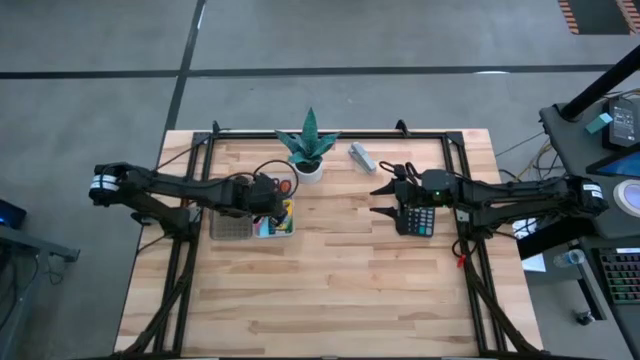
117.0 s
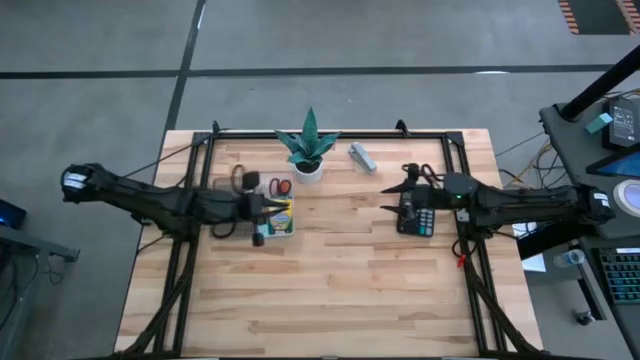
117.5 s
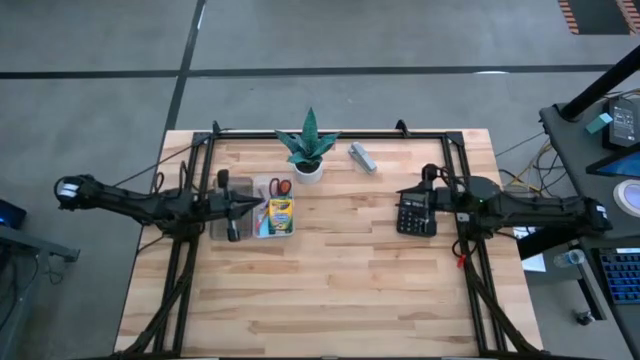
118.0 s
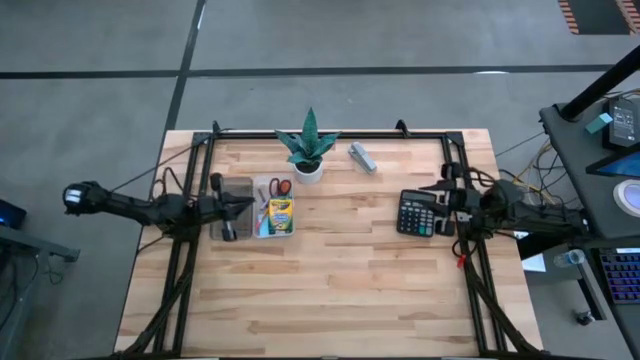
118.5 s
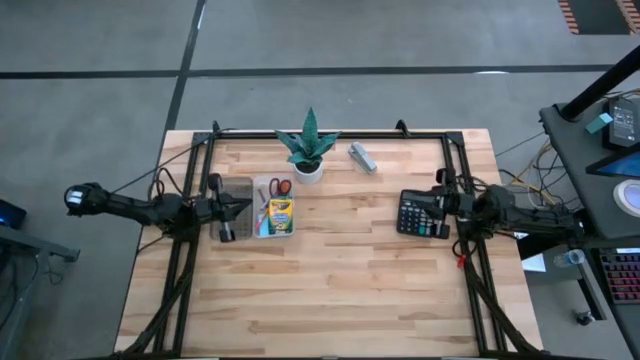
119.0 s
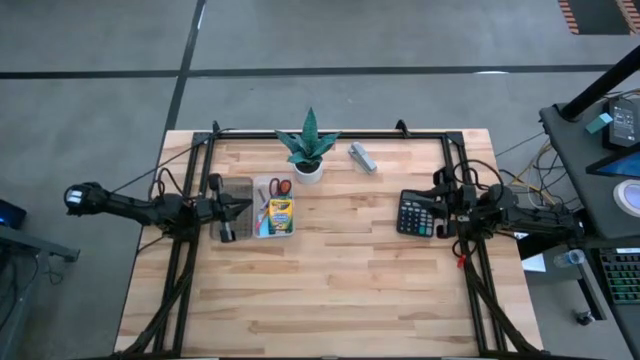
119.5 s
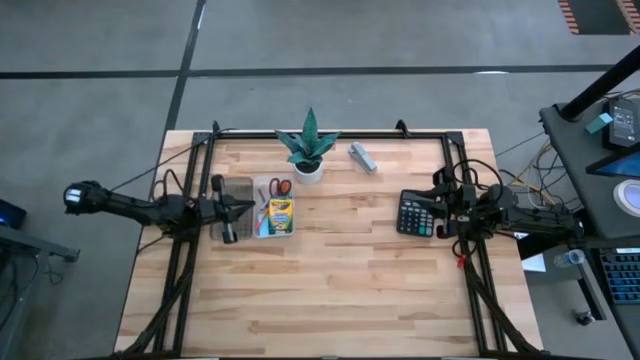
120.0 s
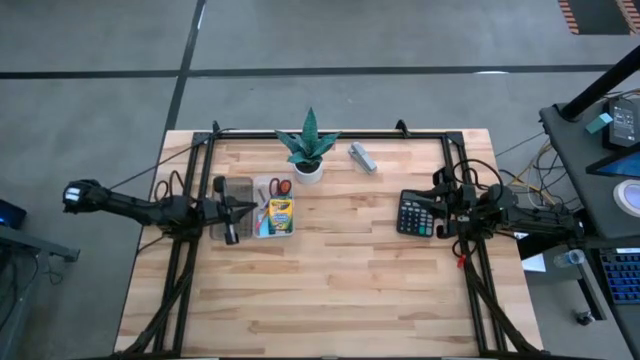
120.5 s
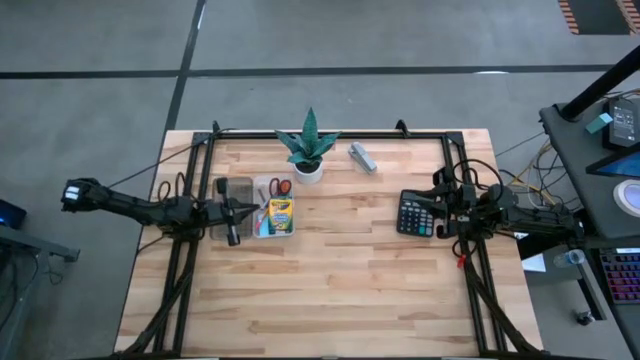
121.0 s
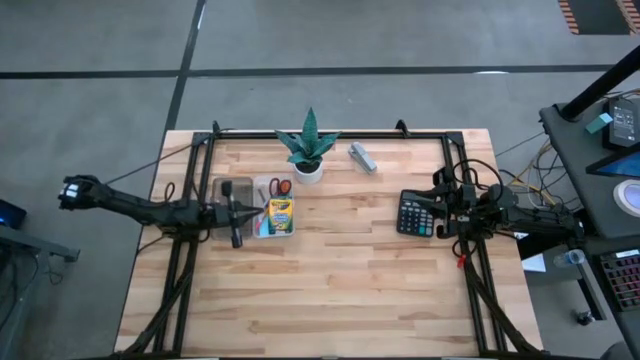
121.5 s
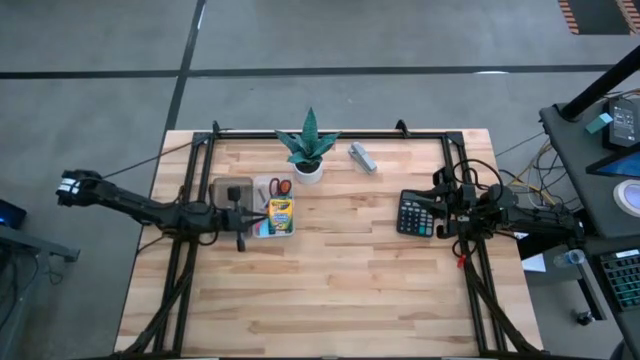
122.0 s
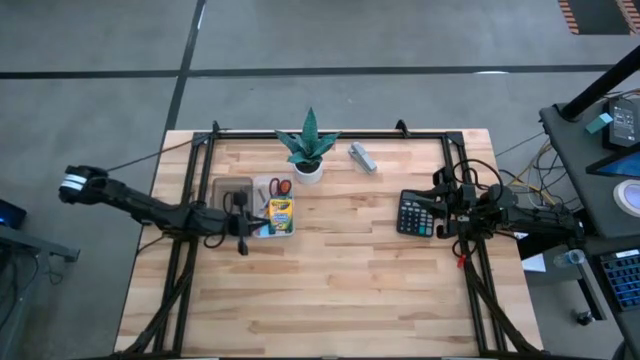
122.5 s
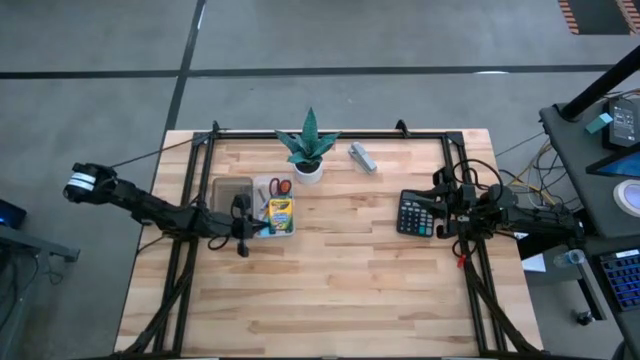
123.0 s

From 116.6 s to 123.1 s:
Task: Pack school essentials
Return to Home Position

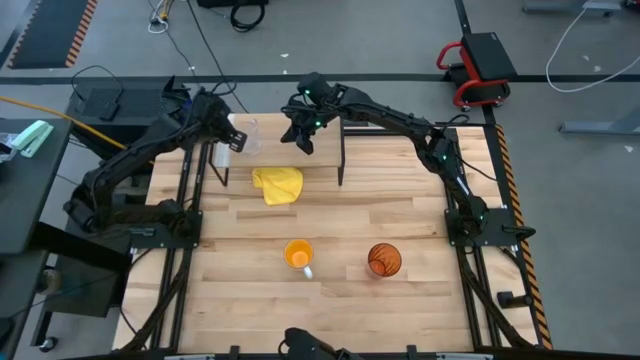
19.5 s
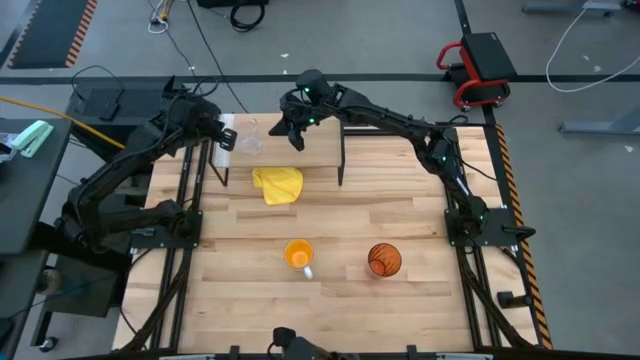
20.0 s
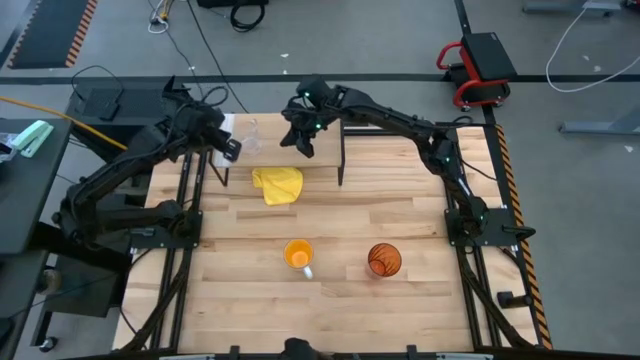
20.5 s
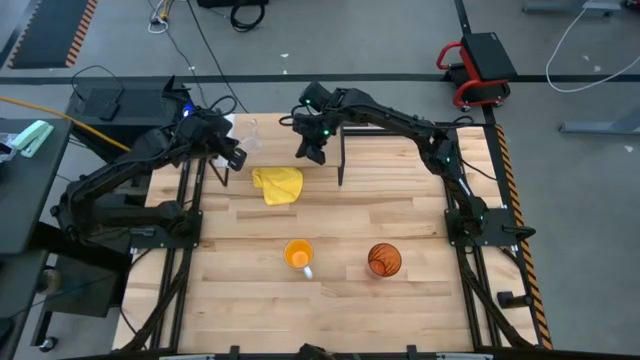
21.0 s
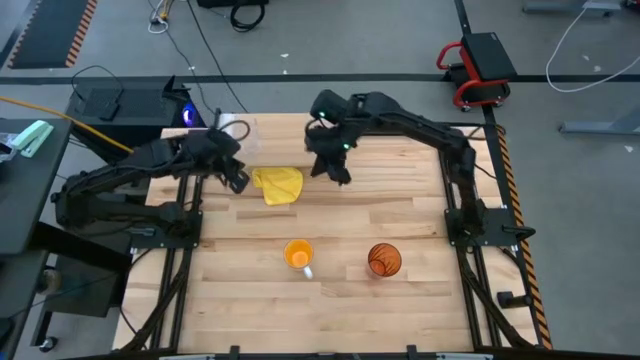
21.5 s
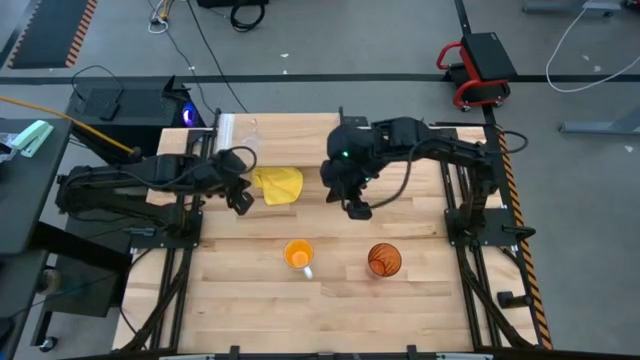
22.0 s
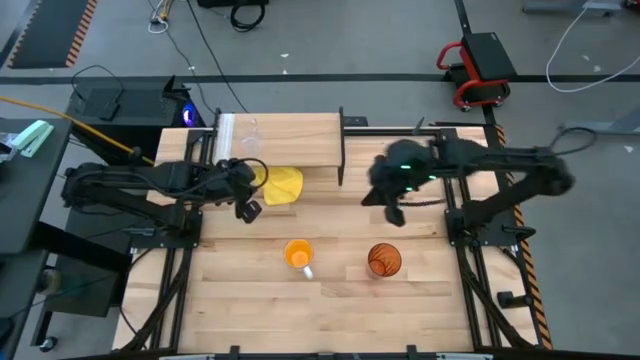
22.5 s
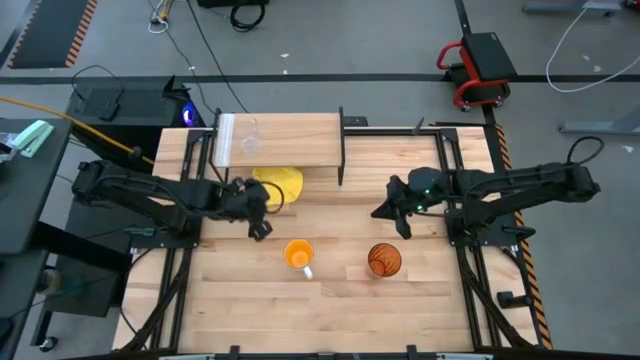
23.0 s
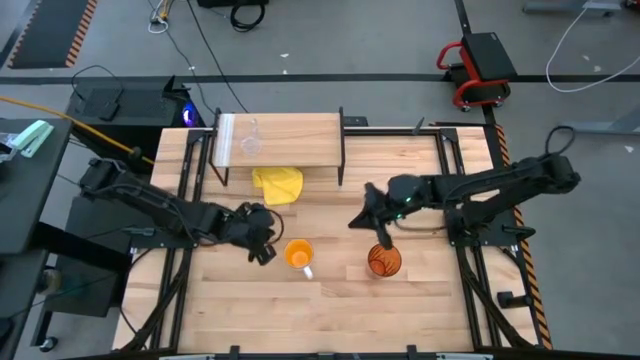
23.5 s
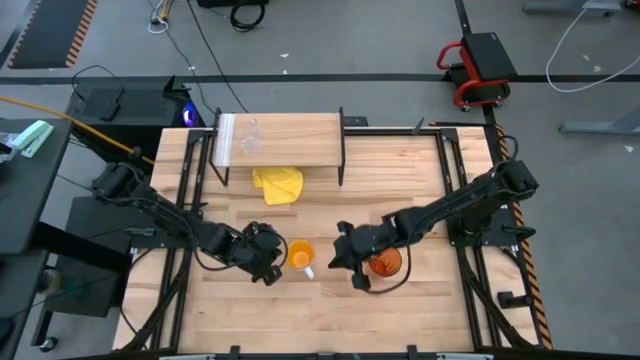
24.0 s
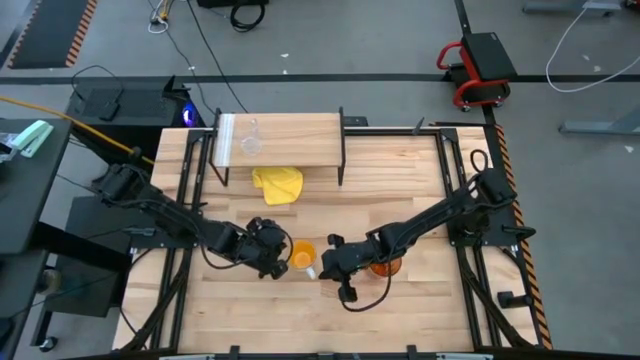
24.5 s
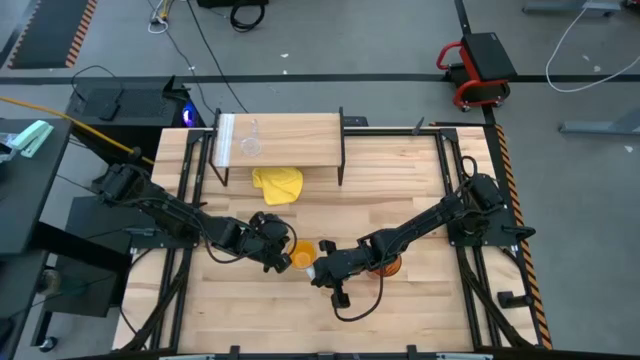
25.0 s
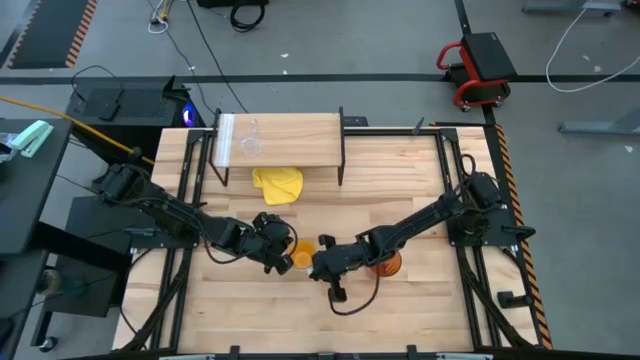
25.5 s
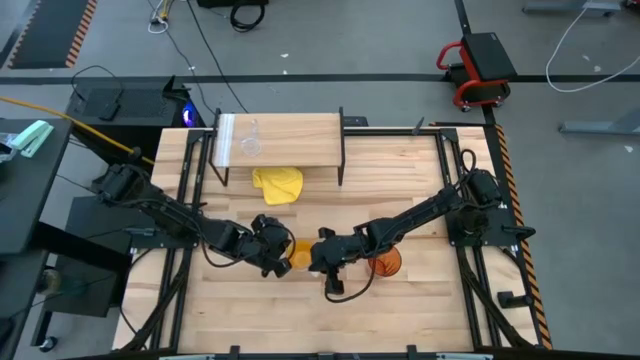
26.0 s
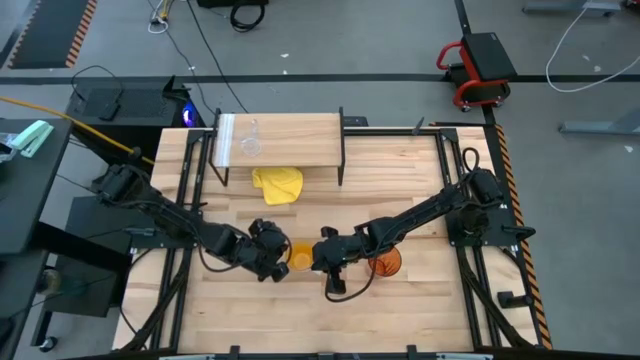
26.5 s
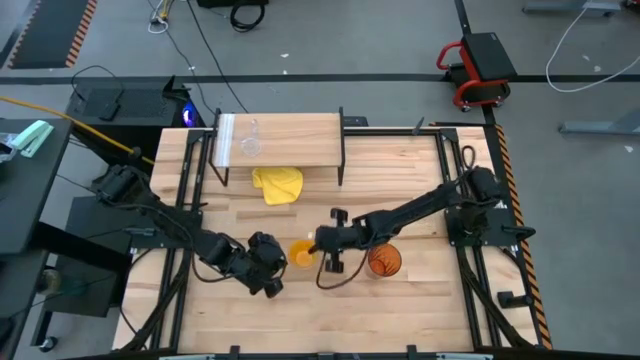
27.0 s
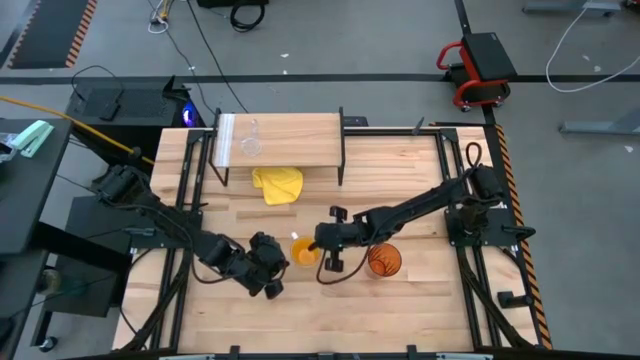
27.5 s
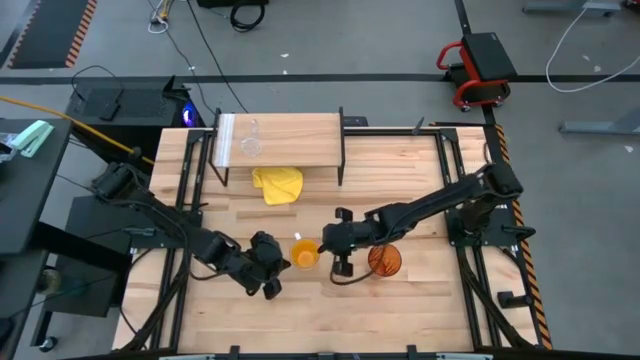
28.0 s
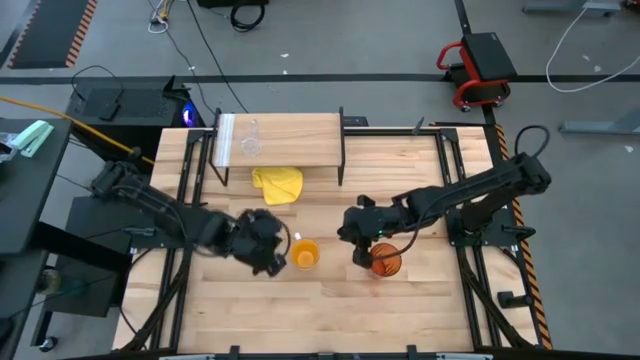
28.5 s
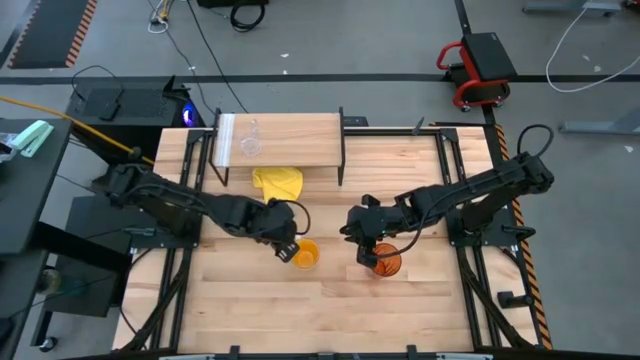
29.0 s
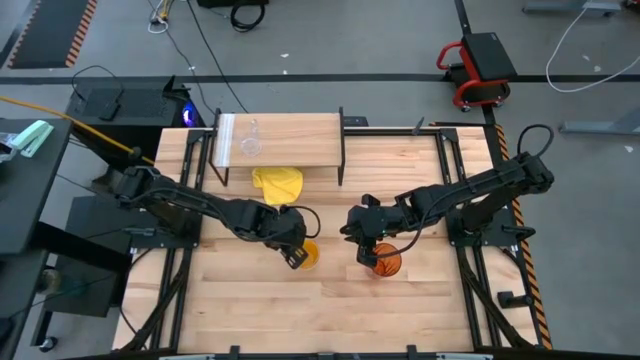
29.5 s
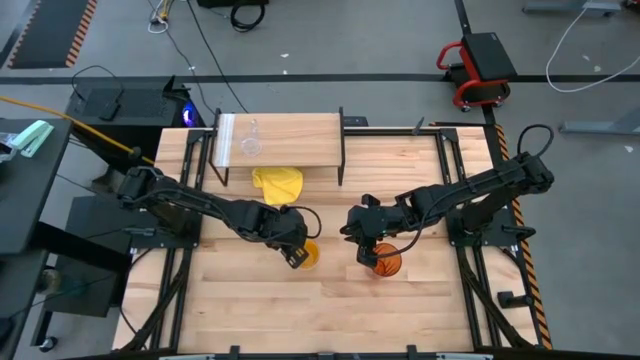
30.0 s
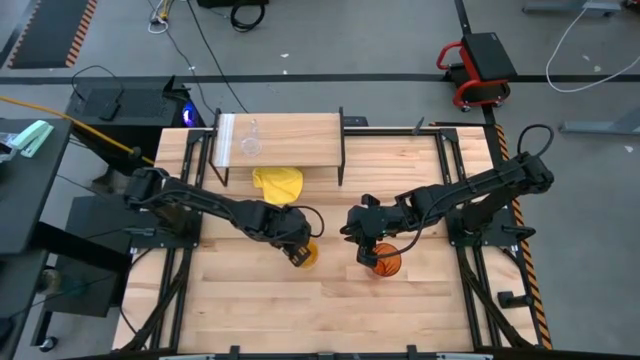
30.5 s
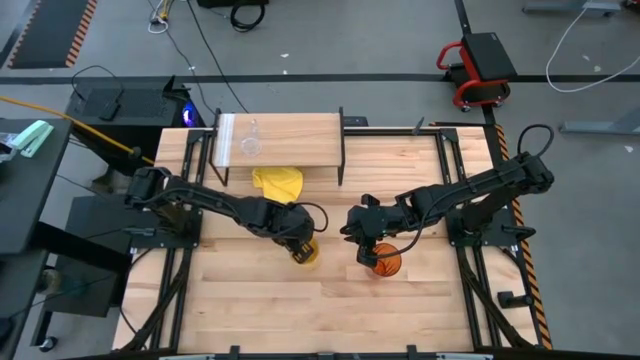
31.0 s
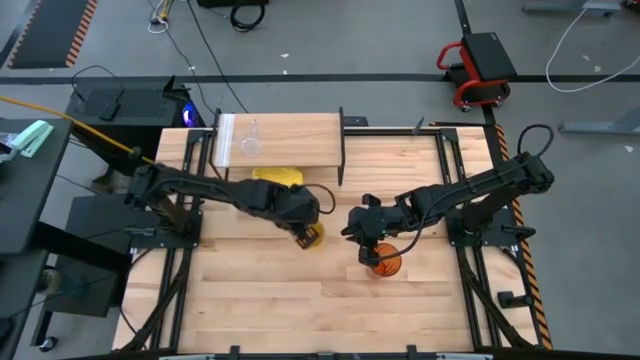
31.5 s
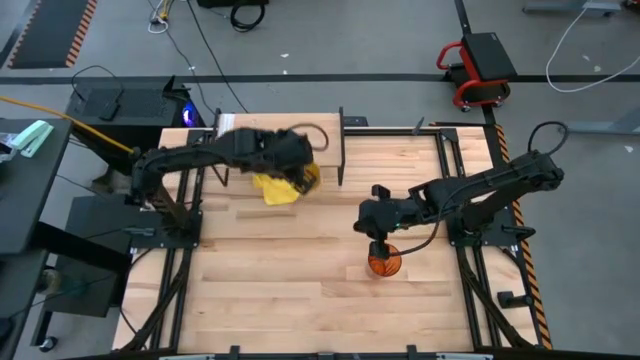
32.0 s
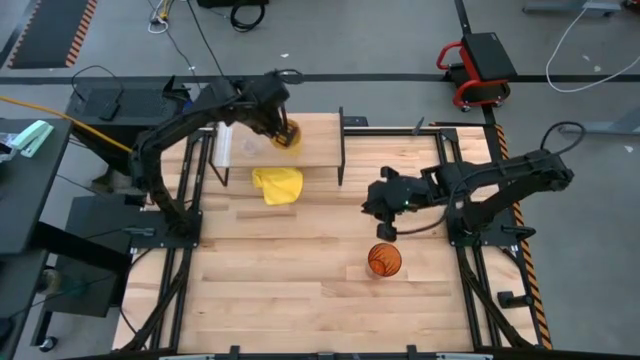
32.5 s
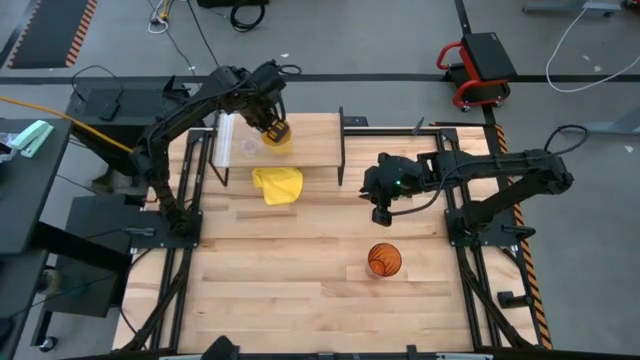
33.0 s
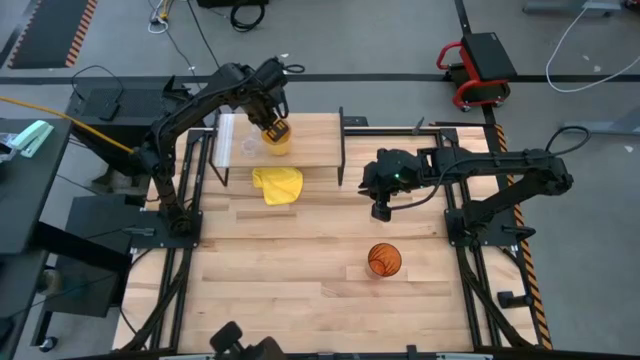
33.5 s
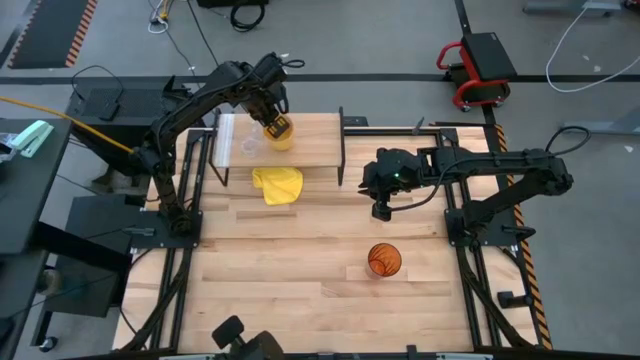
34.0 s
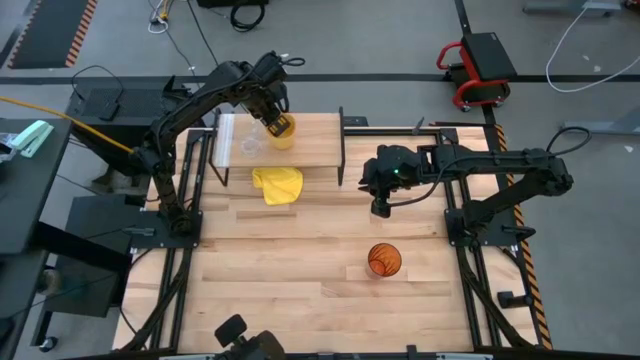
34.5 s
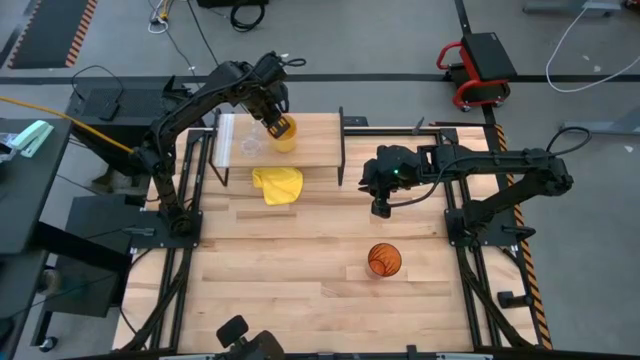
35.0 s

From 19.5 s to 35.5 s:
Task: Stack small to large cups/mugs on shelf
Put the yellow mug on the shelf
